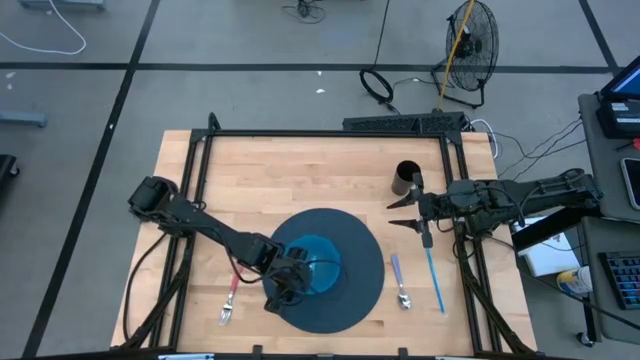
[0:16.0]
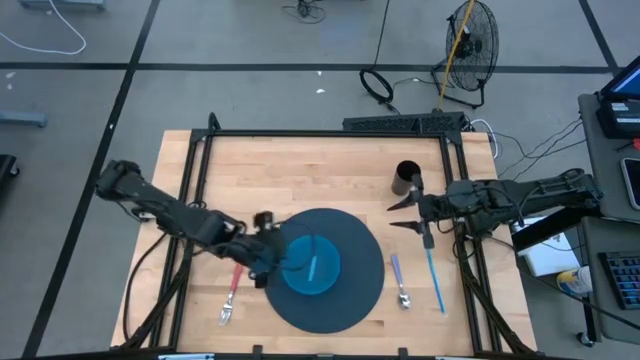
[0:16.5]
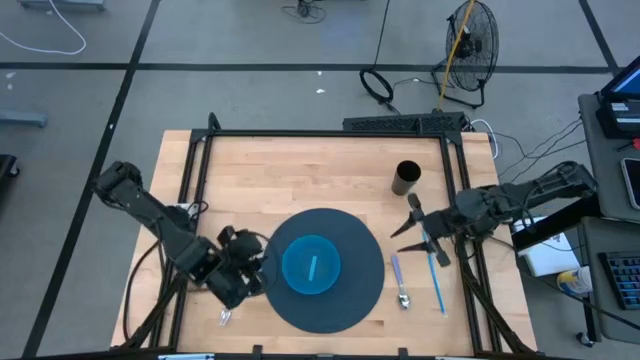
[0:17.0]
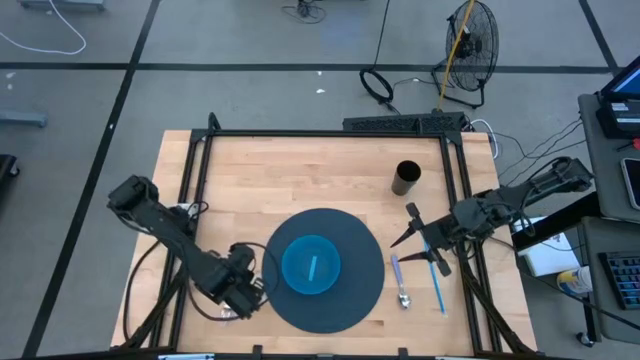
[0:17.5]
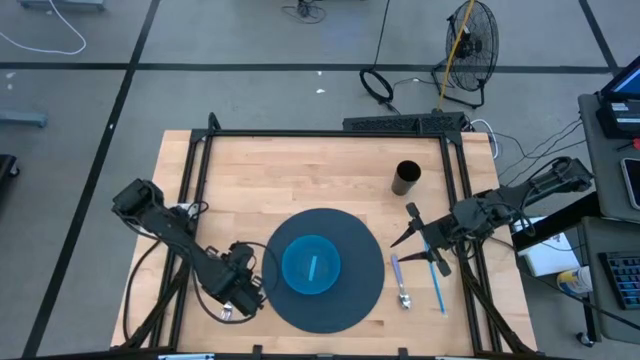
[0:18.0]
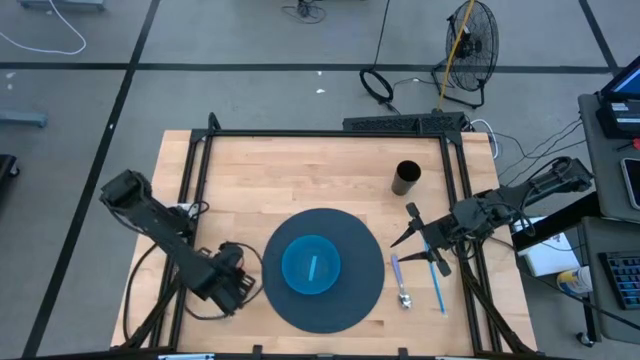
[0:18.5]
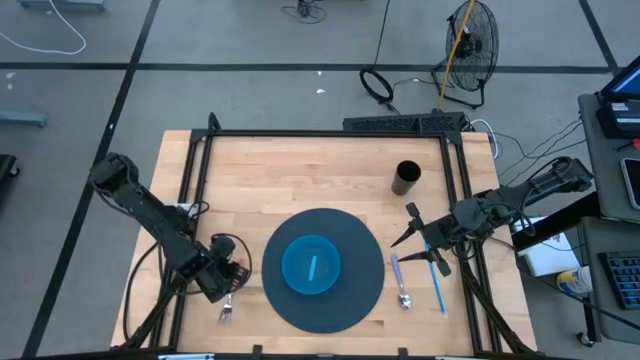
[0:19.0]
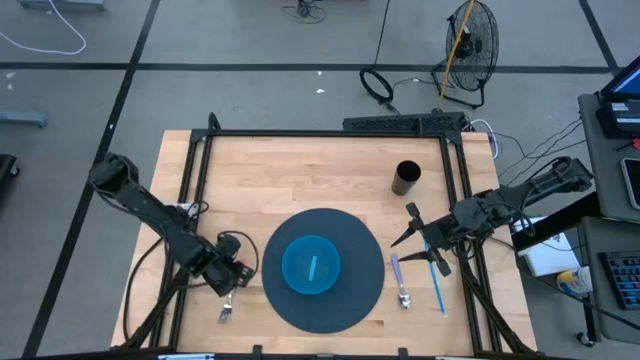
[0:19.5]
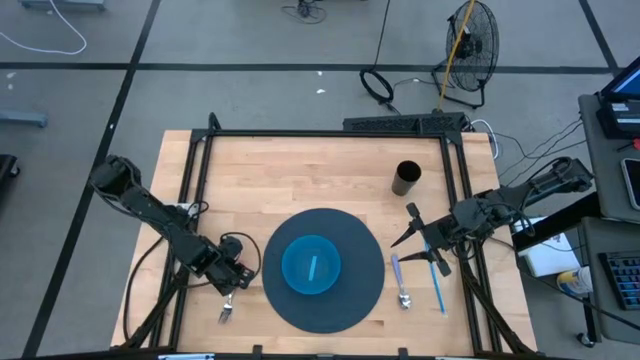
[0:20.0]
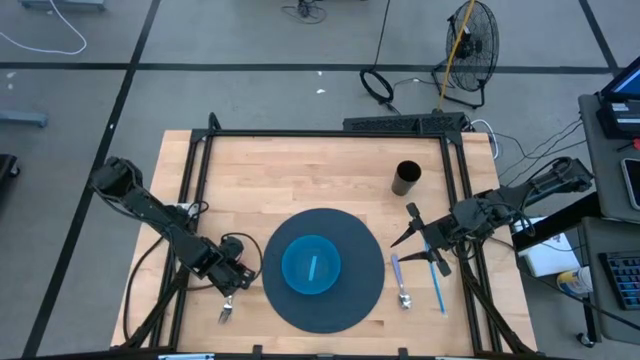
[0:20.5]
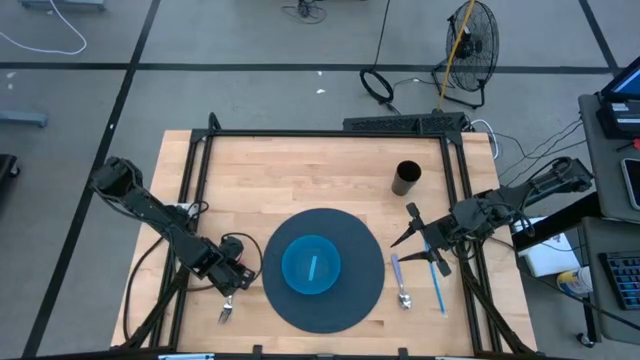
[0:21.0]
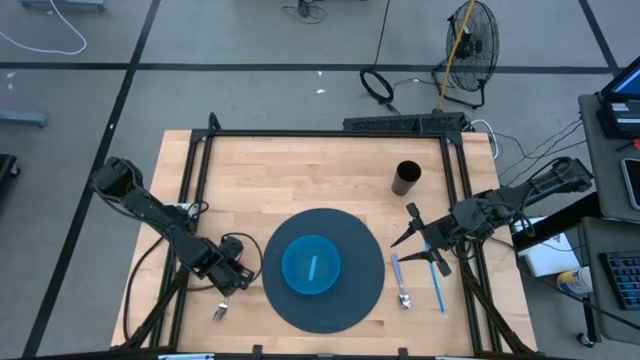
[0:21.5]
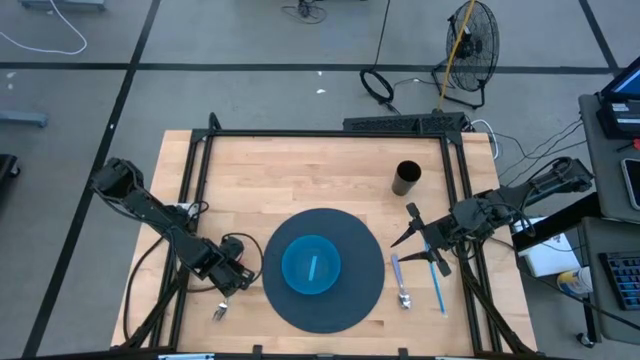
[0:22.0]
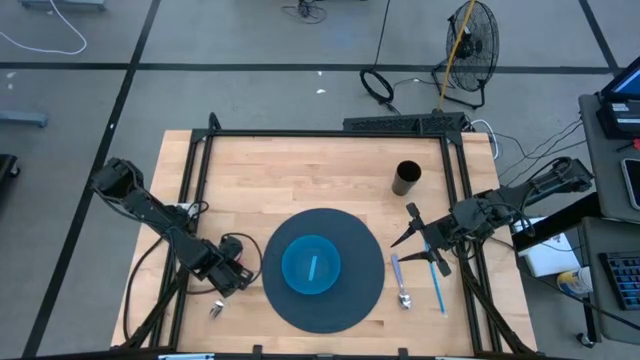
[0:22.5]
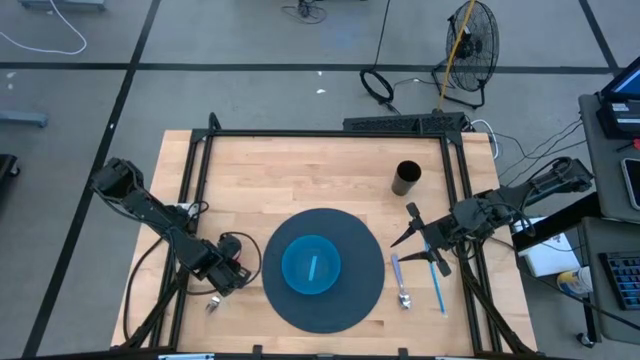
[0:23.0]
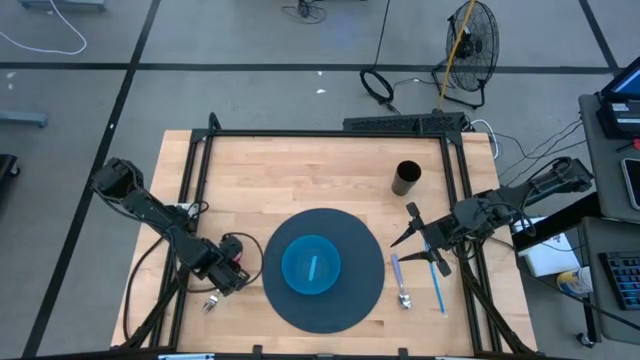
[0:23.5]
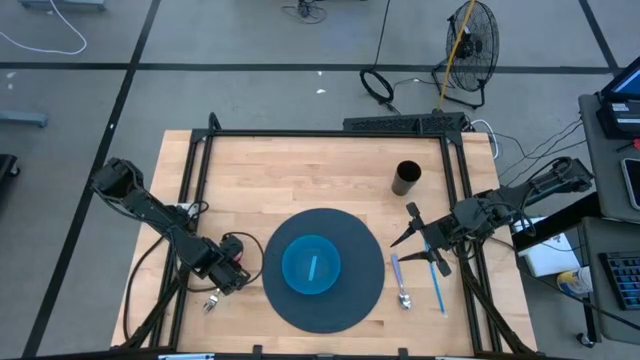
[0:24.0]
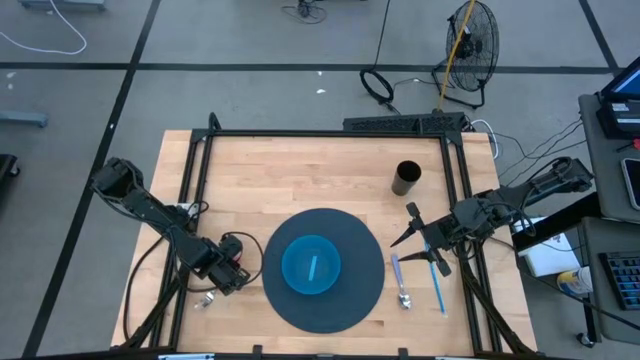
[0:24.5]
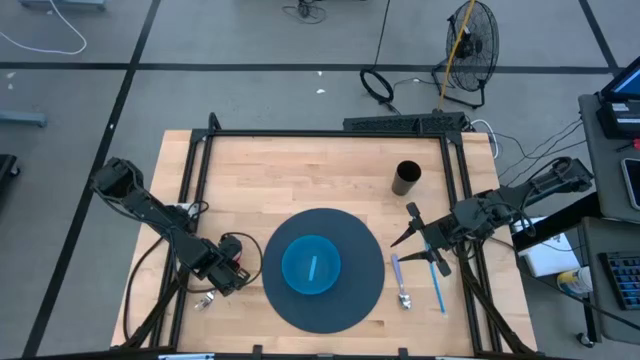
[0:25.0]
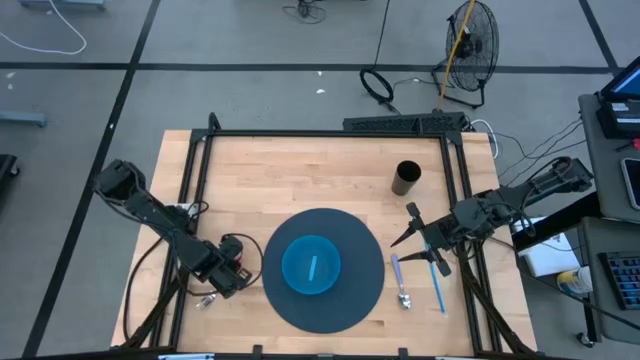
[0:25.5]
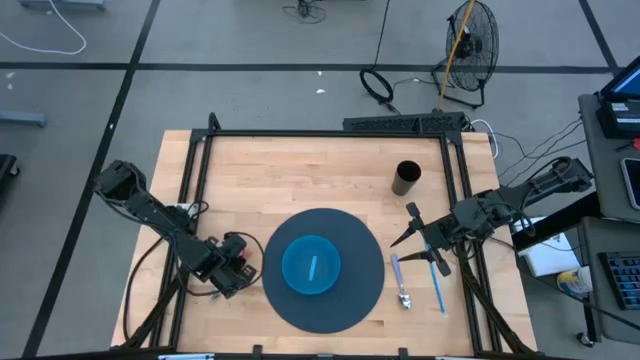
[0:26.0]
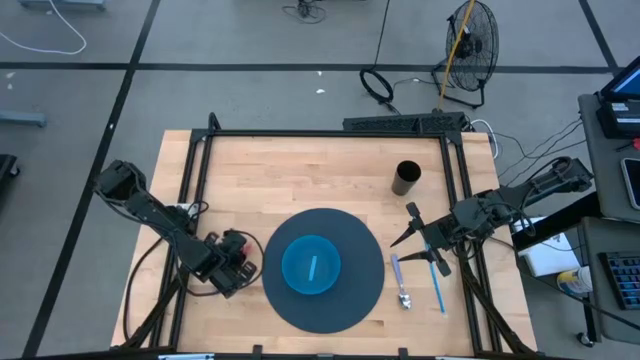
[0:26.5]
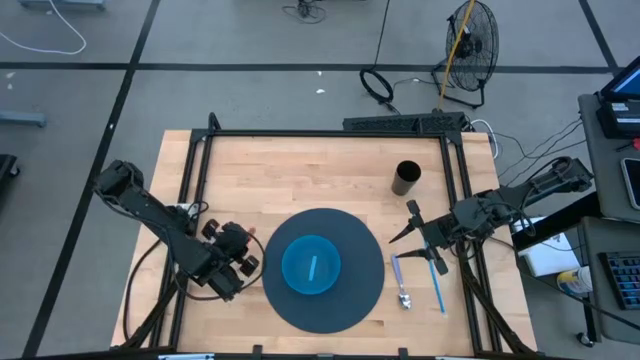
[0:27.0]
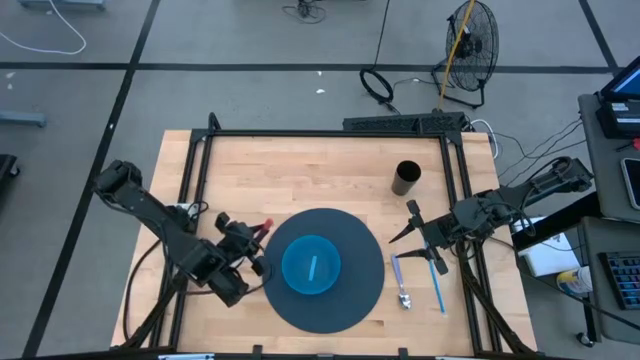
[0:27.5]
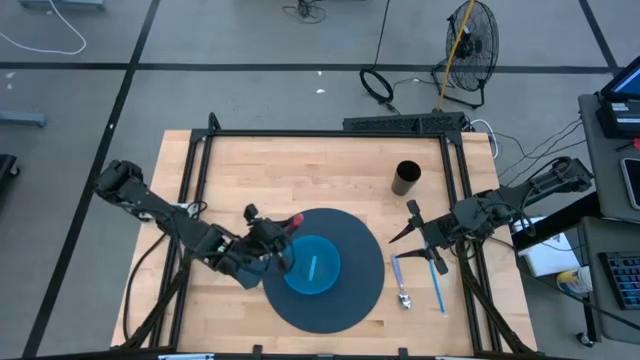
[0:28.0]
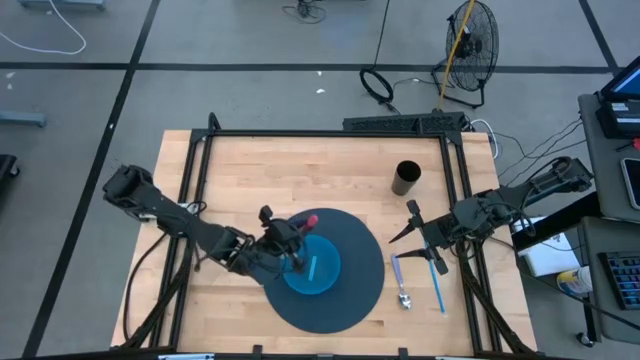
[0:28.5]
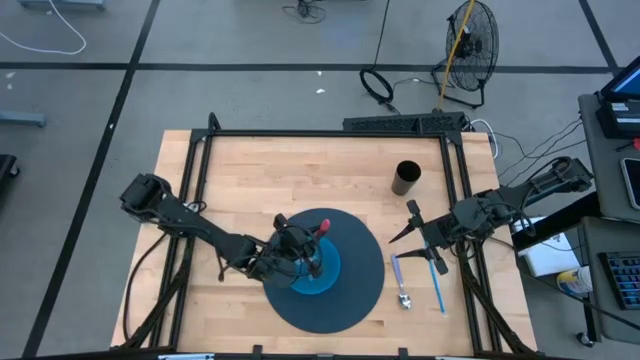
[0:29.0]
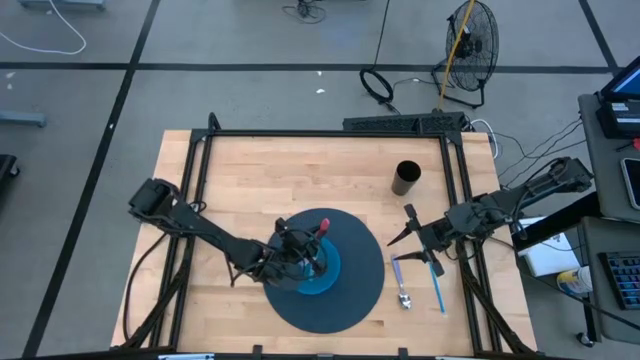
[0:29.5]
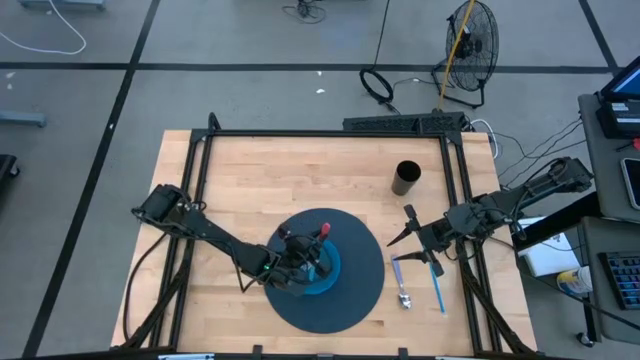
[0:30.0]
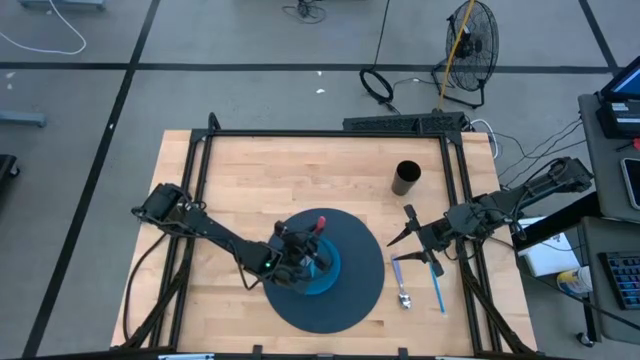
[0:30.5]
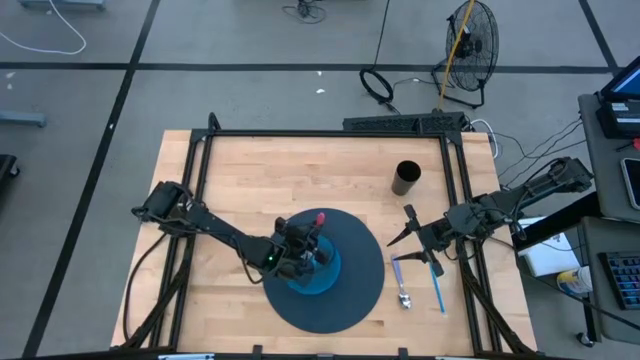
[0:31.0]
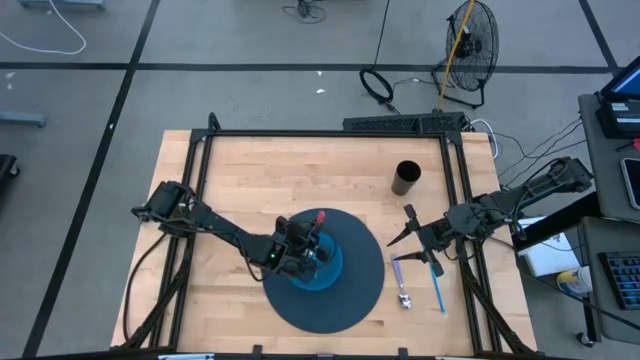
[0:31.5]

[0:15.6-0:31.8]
Task: Pick & Place Utensil
Put the pink fork into the blue bowl on the blue mat

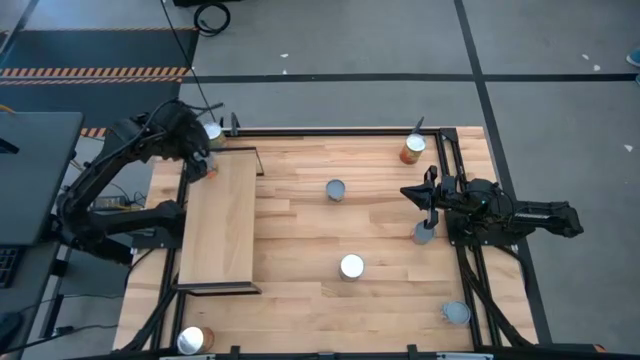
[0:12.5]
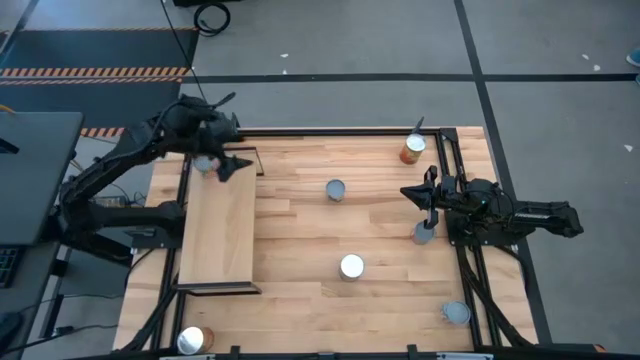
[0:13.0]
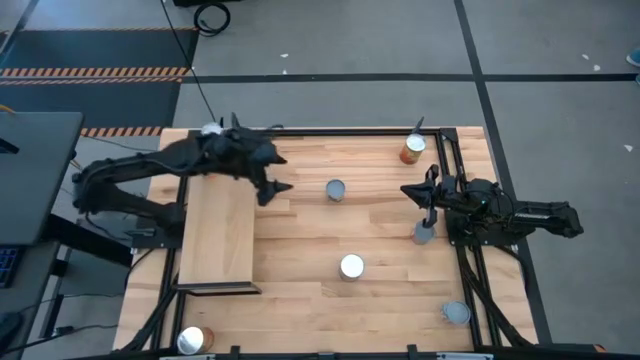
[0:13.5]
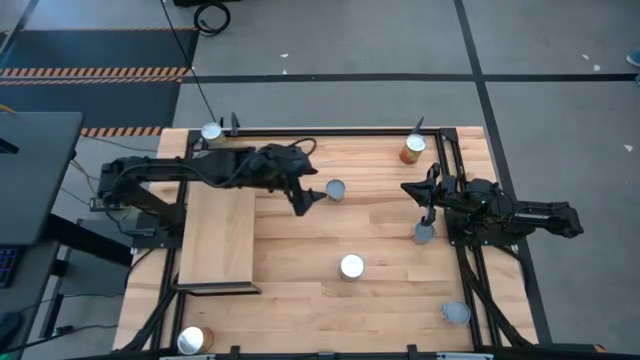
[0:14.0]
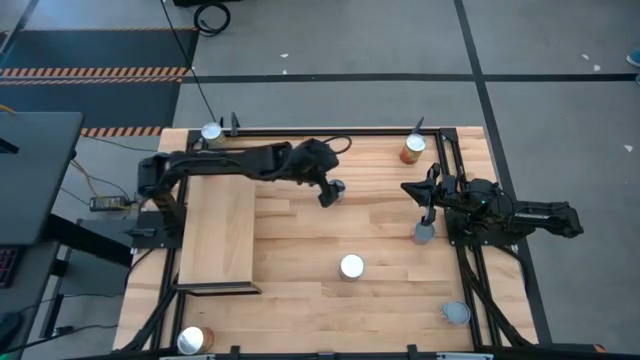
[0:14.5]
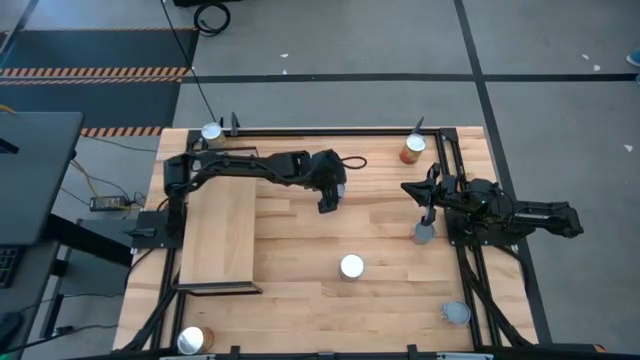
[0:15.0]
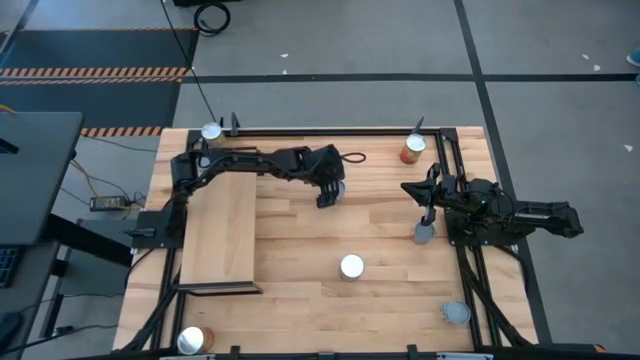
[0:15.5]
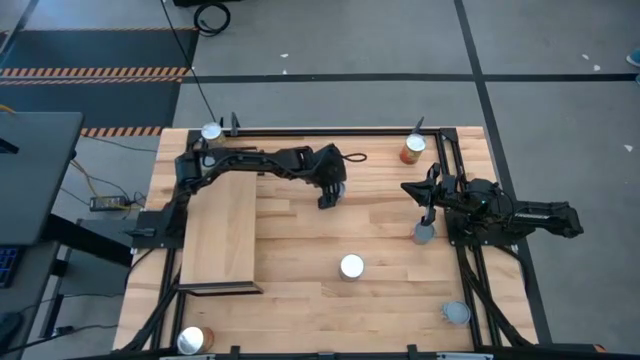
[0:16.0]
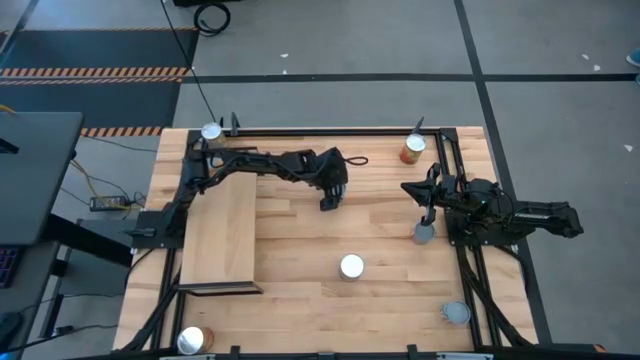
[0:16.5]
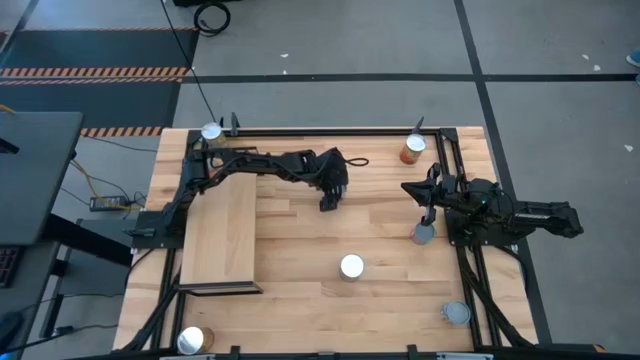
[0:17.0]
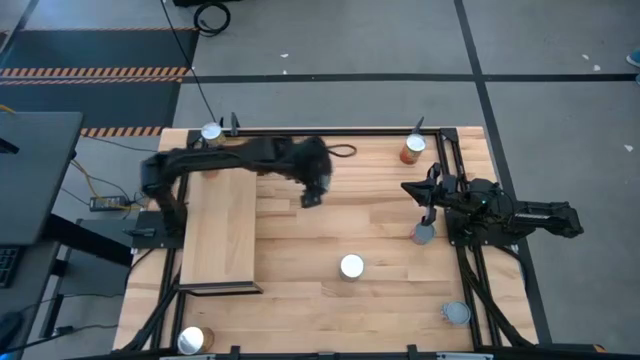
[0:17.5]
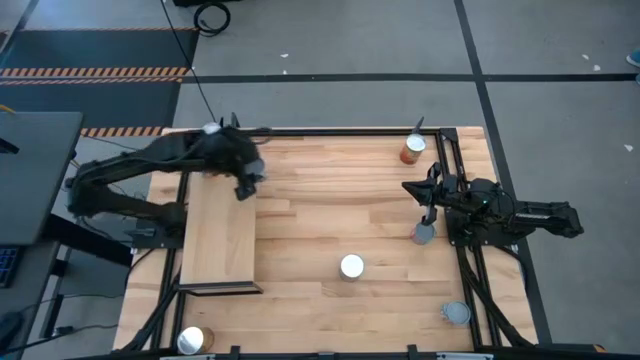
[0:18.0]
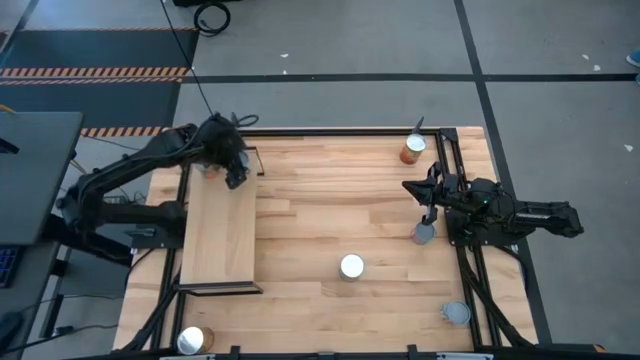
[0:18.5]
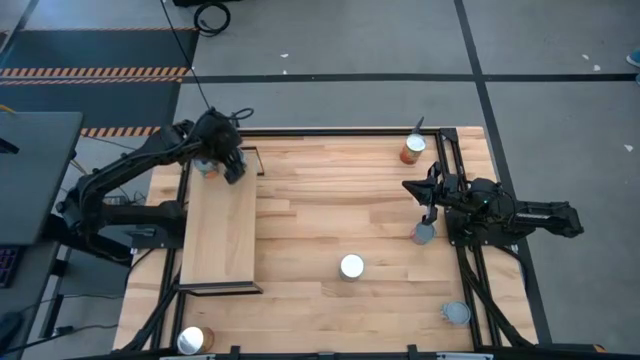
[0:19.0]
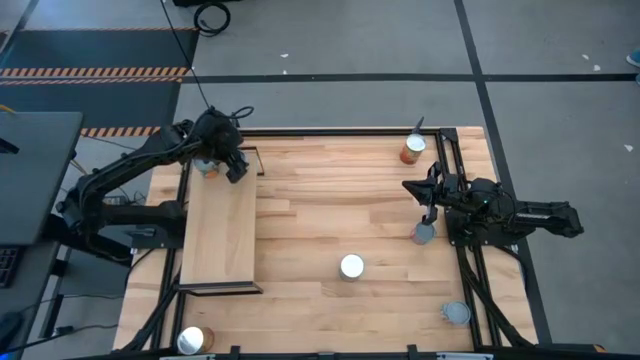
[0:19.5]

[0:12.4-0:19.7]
Task: Pick and place cans onto a shelf
Put the top canned peas on the shelf
